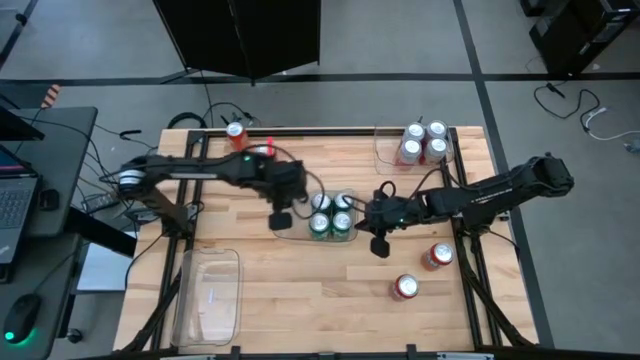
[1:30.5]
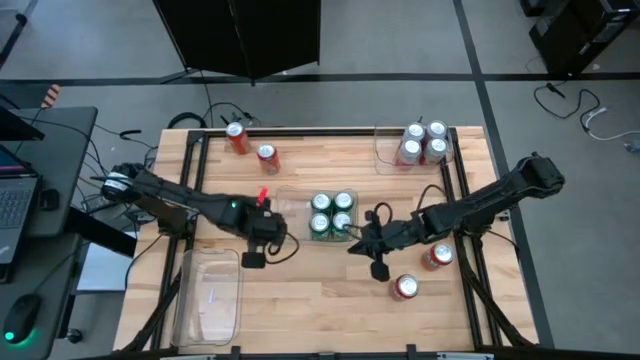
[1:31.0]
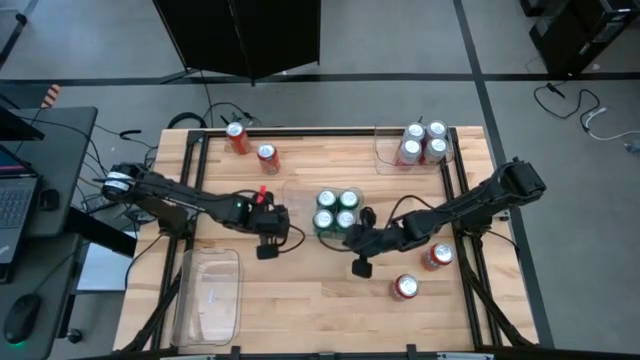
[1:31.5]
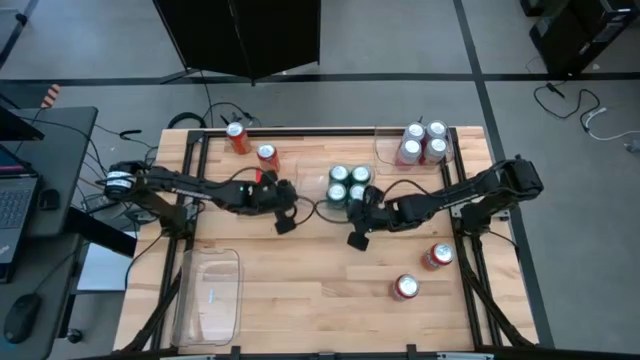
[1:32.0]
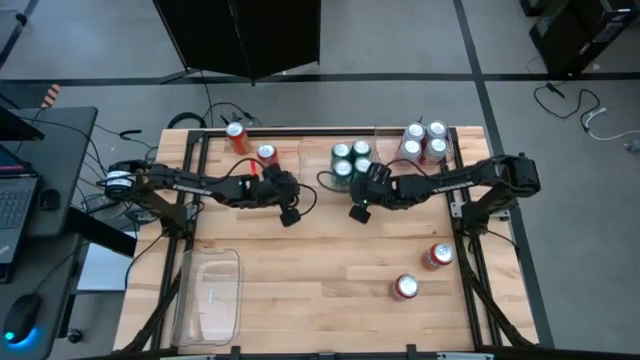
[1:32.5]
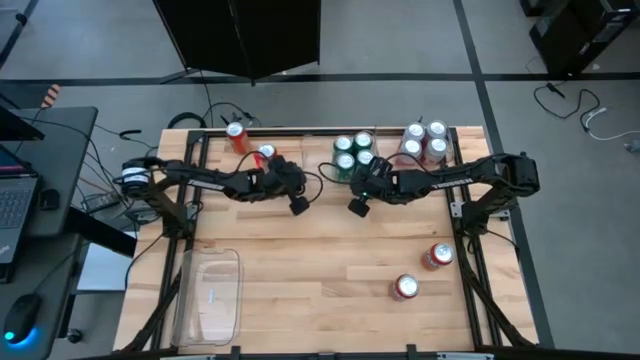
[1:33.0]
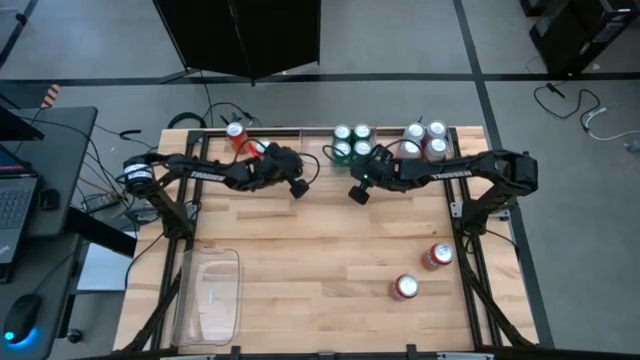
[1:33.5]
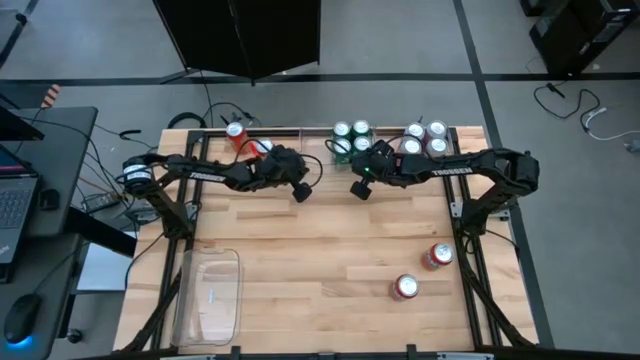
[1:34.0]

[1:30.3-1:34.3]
Task: Sort soda cans
Move the middle transparent bin from the middle to the top middle of the table

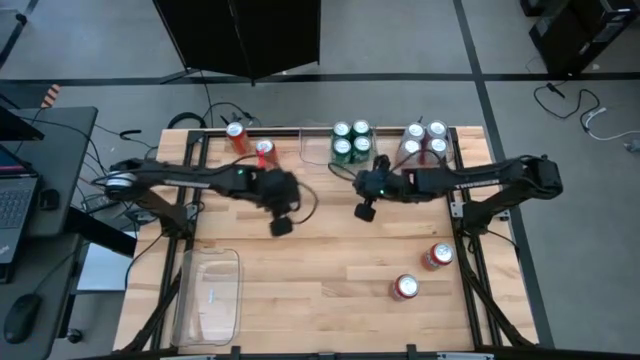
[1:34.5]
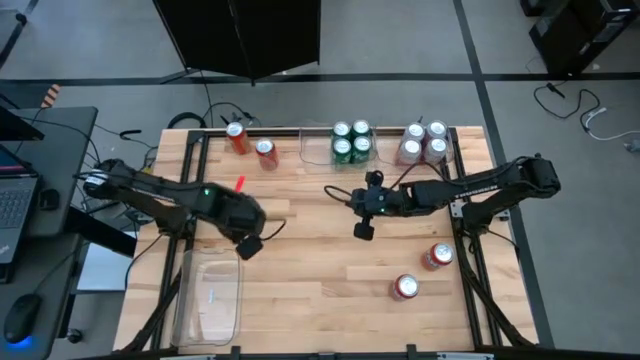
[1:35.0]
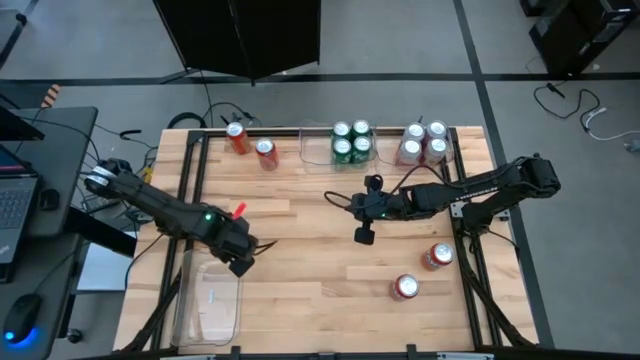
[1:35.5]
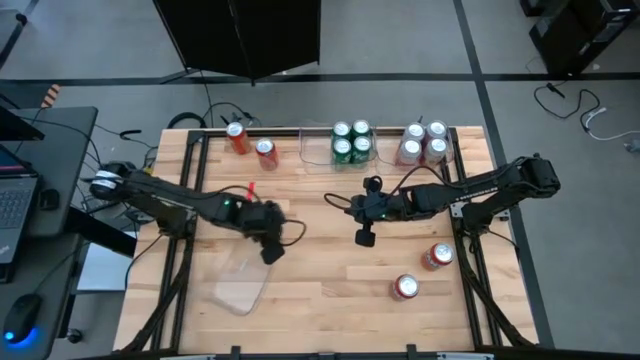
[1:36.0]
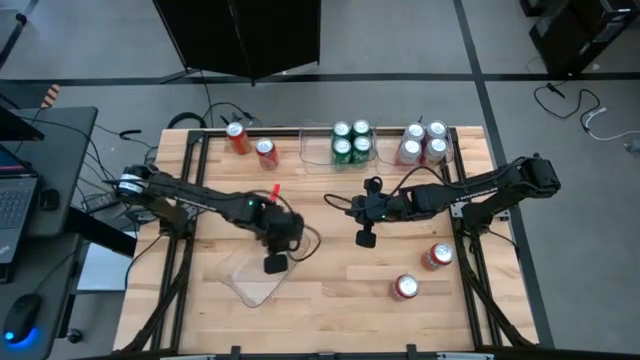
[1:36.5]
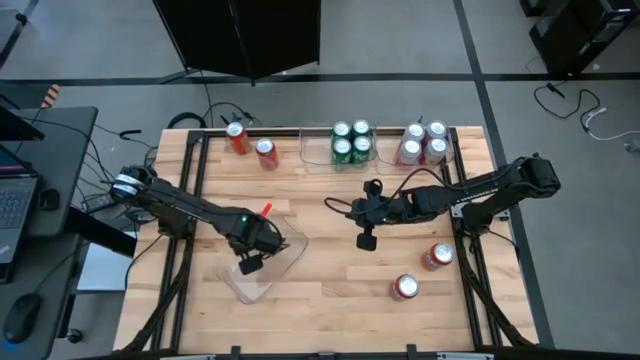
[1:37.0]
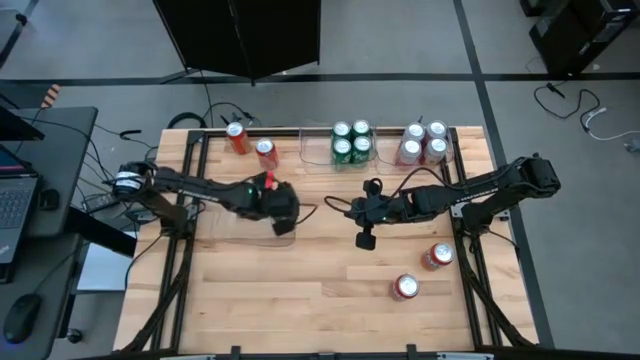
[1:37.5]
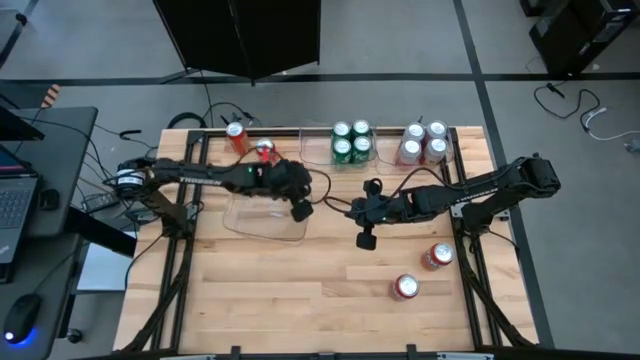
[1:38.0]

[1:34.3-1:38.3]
Move the bottom transparent bin from the bottom left to the middle of the table

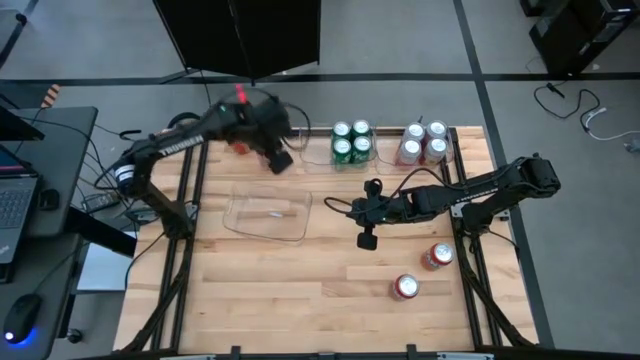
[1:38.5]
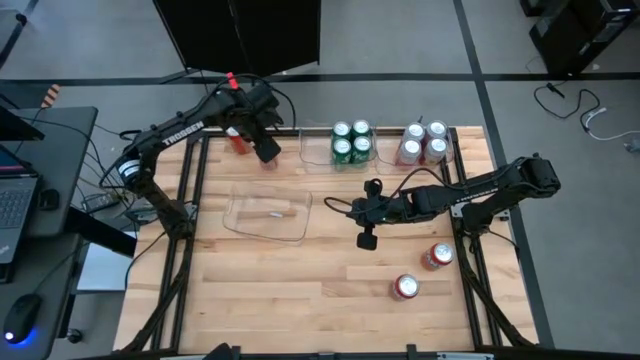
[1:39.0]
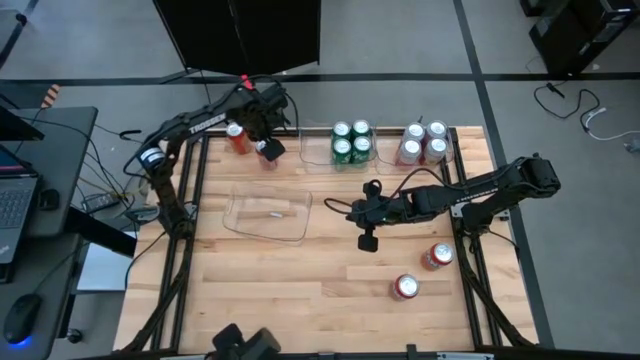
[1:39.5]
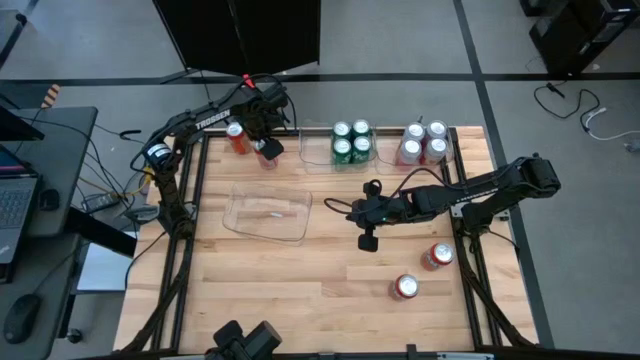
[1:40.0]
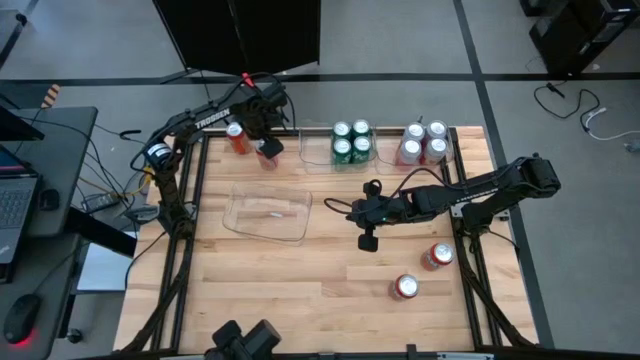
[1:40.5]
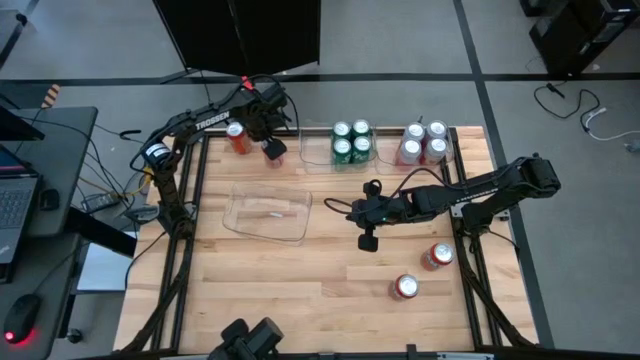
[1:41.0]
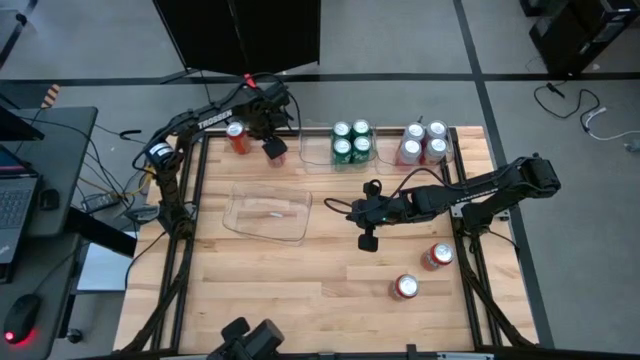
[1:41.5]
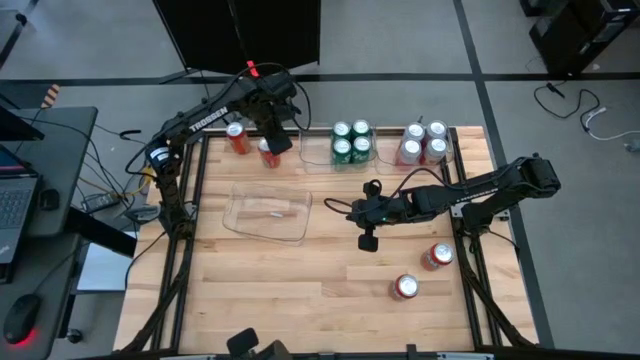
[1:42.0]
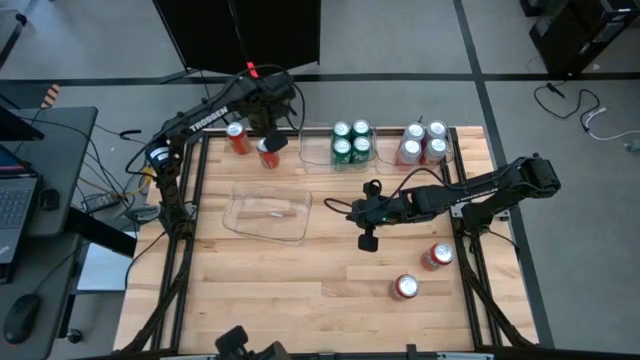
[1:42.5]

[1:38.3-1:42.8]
Put the middle top red soda can into the bottom transparent bin

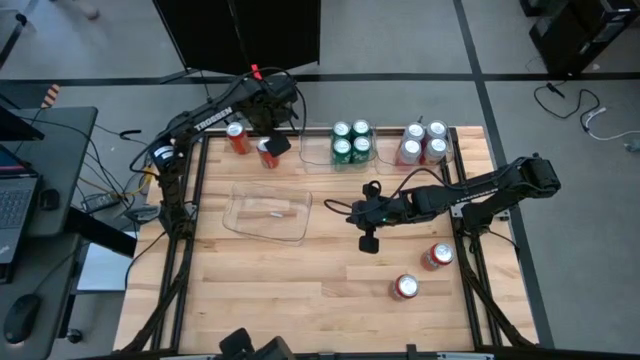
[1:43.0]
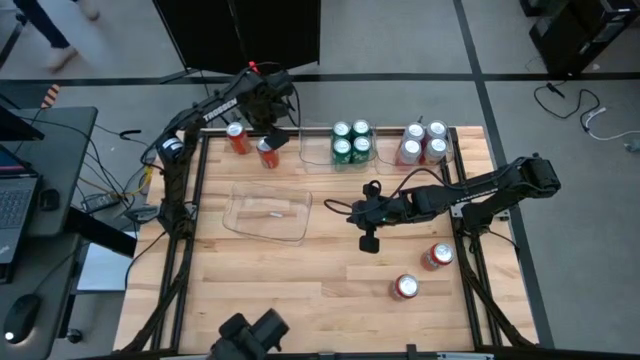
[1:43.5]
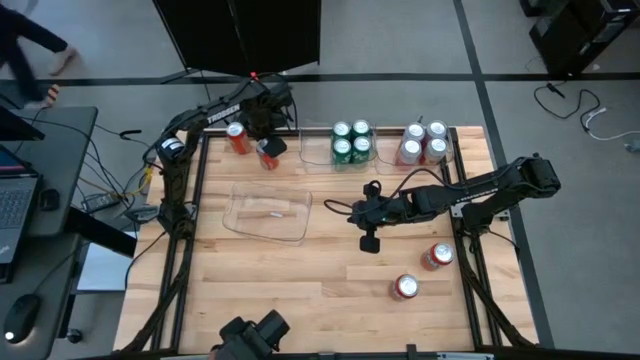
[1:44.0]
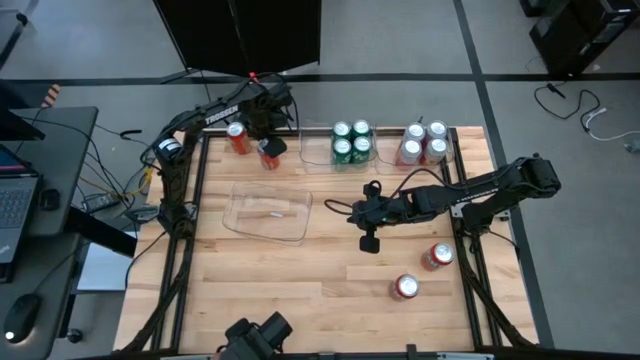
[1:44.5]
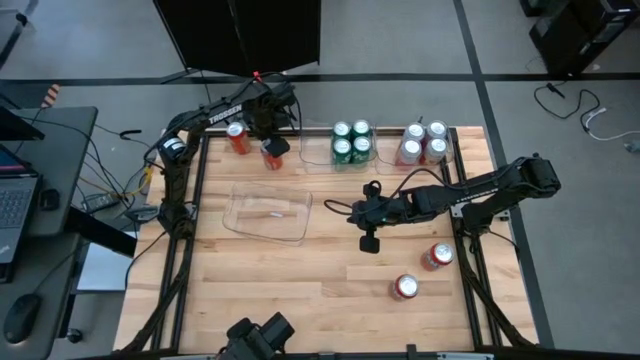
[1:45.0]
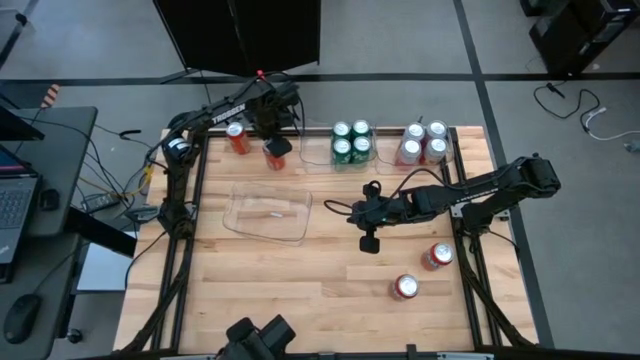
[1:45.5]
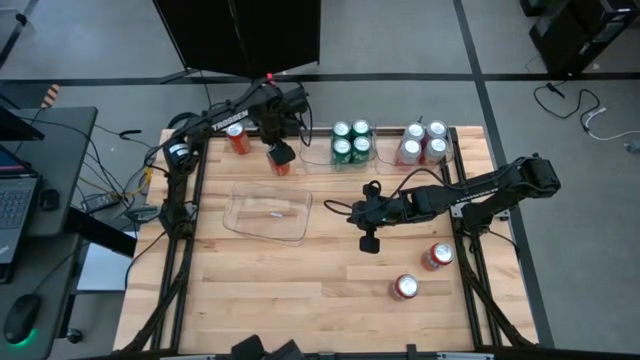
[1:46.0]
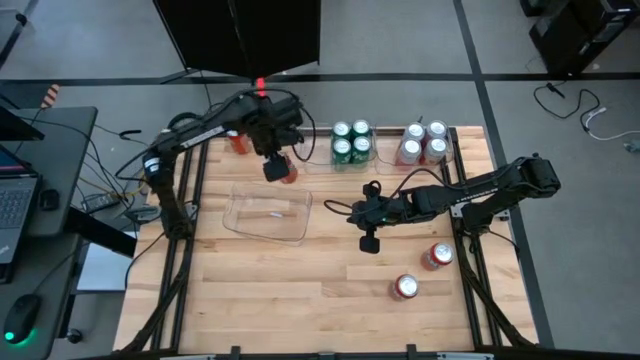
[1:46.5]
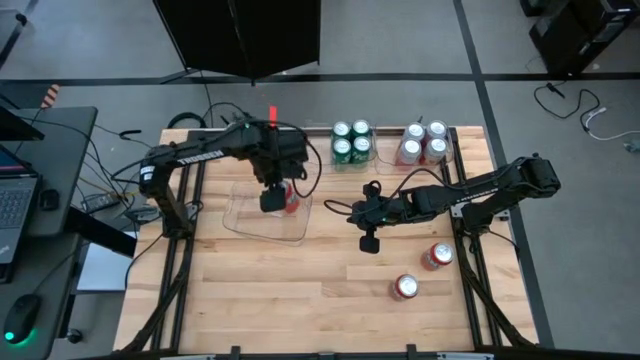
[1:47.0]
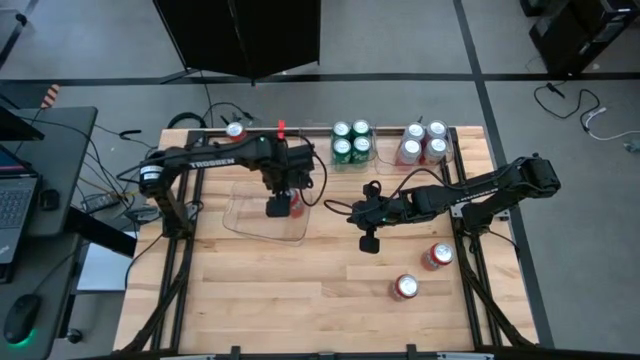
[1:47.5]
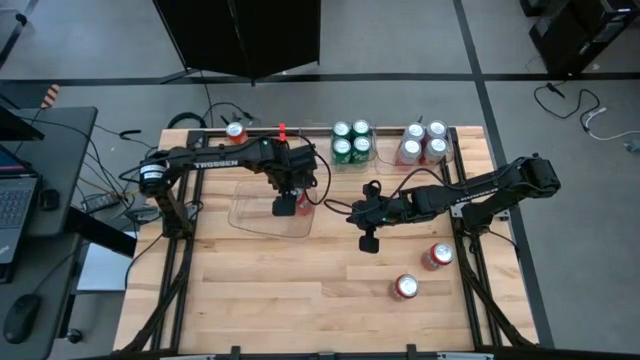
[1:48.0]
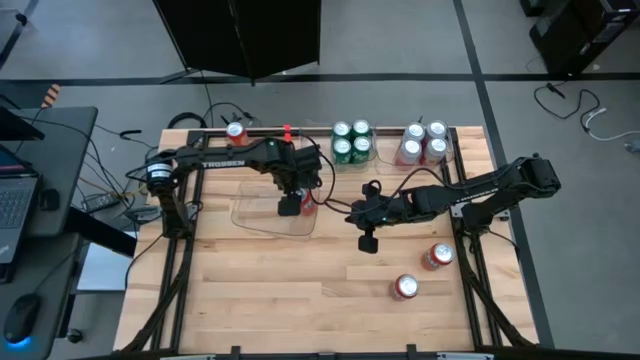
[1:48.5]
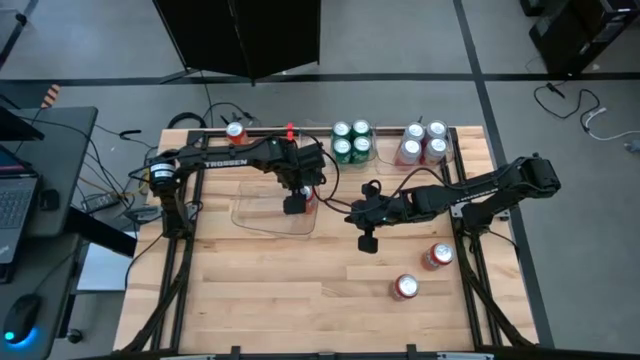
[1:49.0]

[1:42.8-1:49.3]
Put the middle top red soda can into the bottom transparent bin

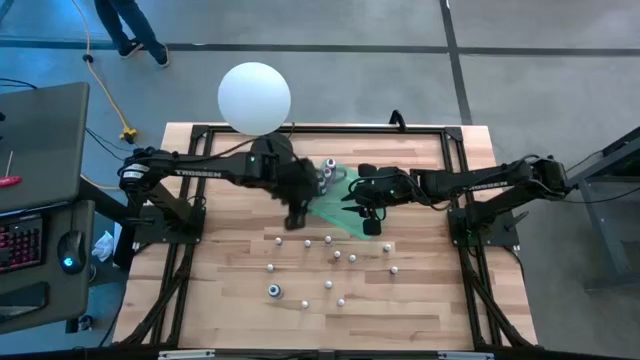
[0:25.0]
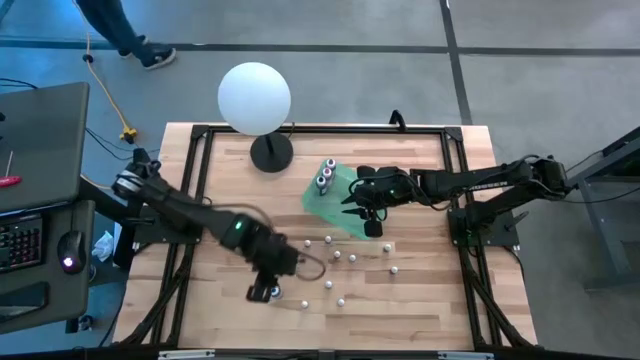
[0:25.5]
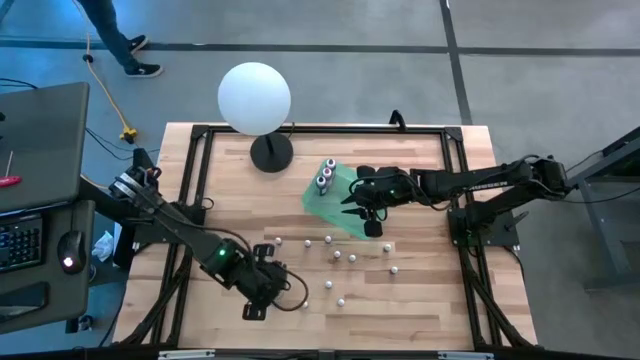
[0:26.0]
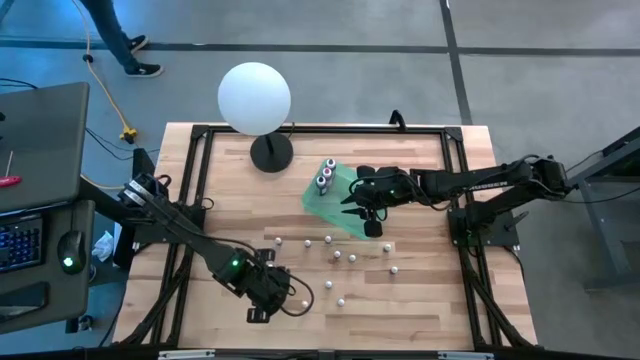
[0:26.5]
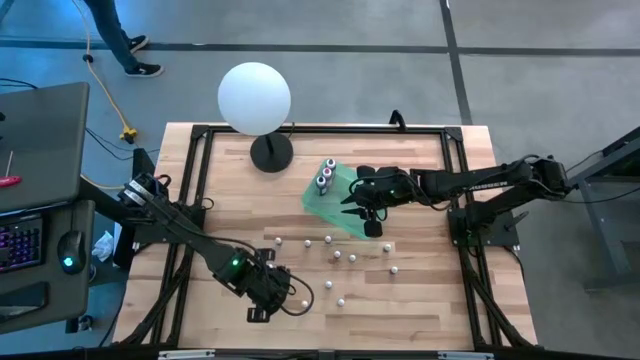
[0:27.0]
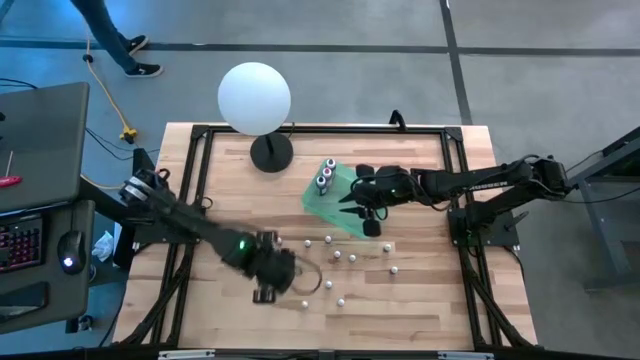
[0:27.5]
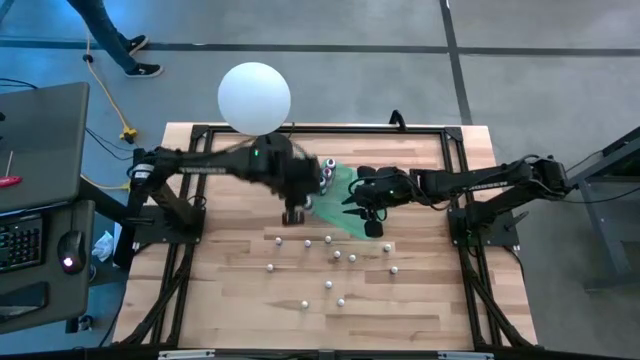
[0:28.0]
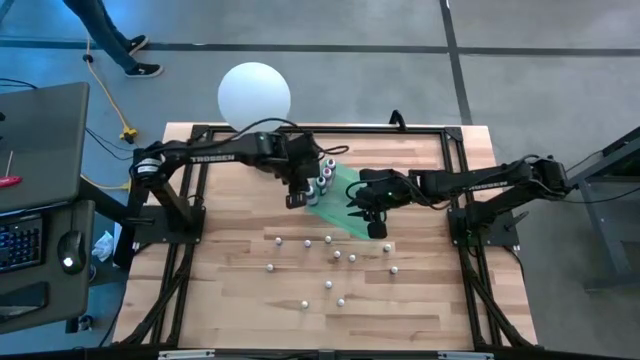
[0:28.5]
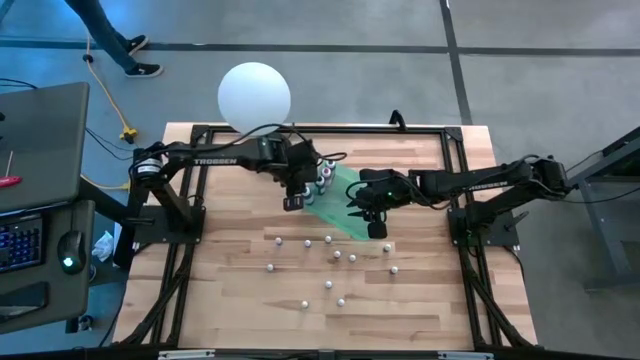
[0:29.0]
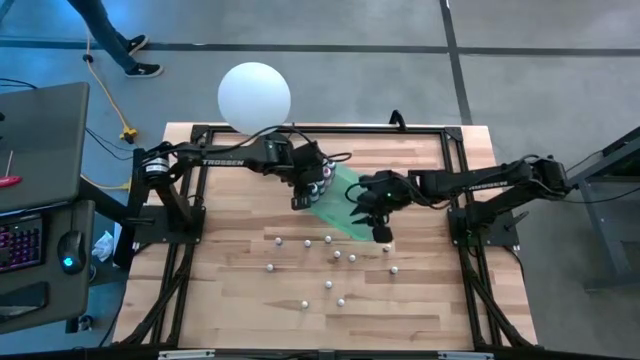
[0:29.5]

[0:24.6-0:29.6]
Task: Pick & Place food coloring
Put the large blue food coloring bottle into the green container
